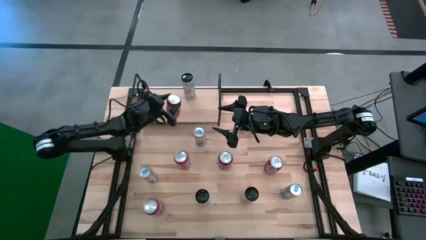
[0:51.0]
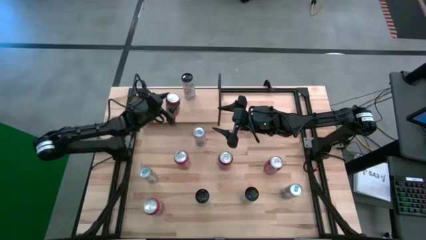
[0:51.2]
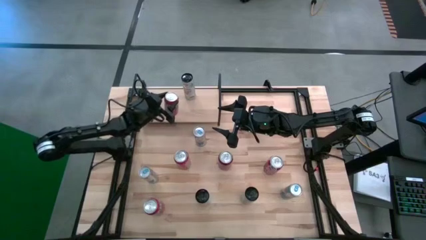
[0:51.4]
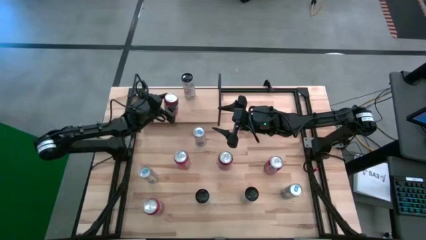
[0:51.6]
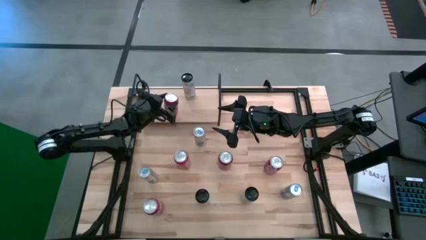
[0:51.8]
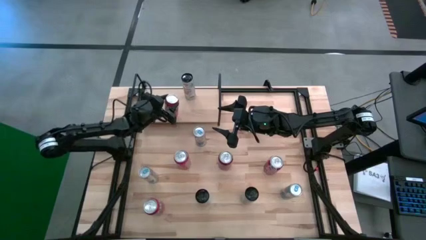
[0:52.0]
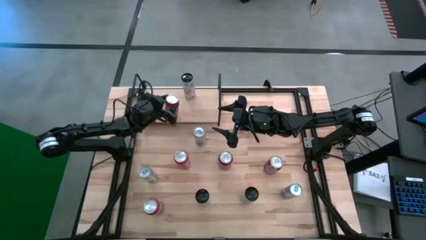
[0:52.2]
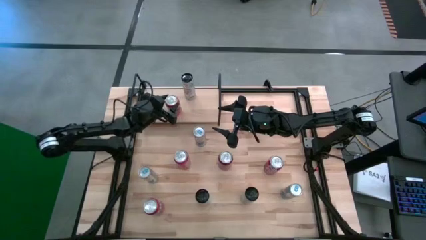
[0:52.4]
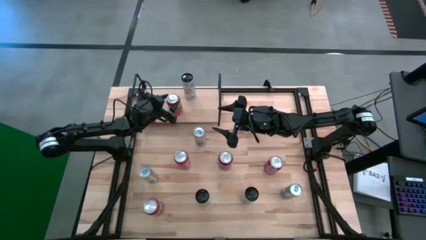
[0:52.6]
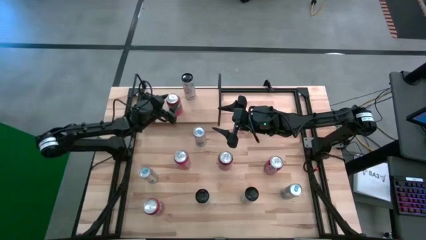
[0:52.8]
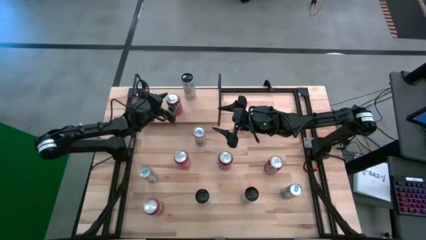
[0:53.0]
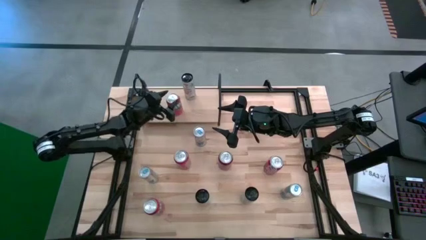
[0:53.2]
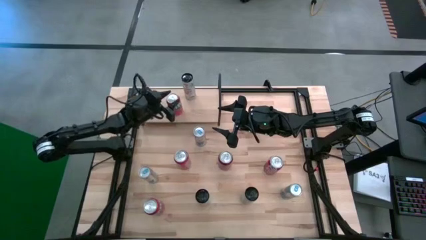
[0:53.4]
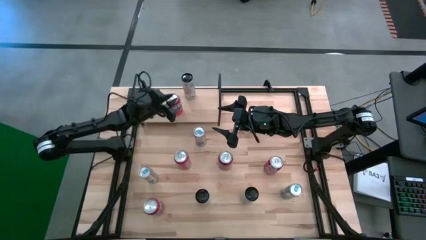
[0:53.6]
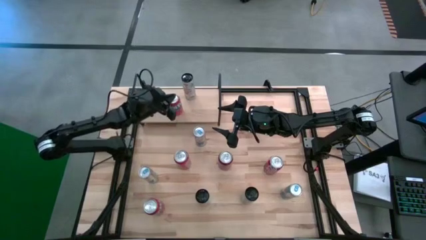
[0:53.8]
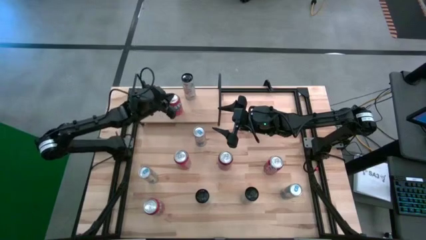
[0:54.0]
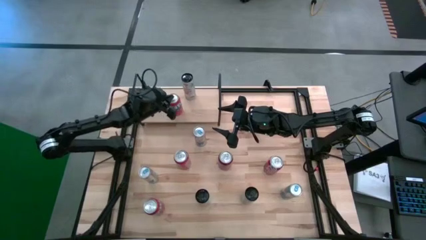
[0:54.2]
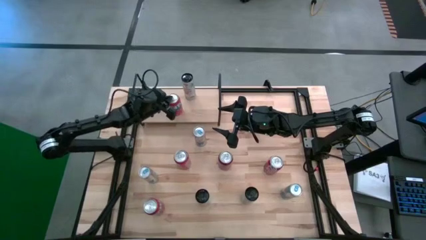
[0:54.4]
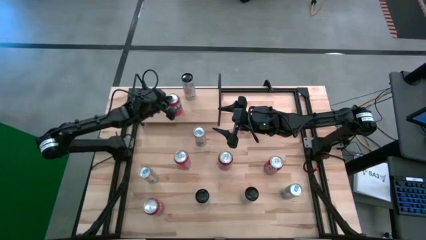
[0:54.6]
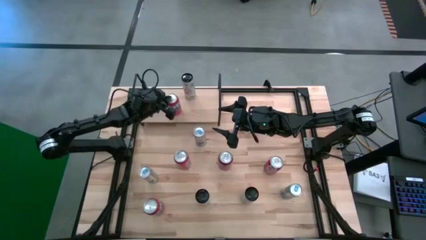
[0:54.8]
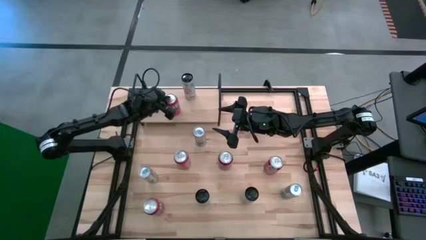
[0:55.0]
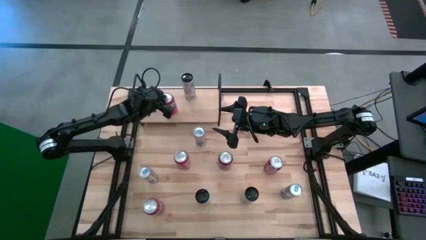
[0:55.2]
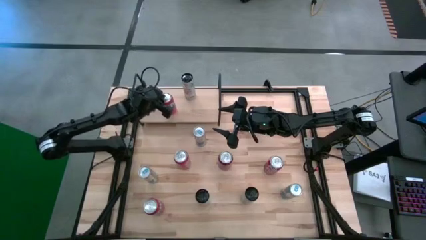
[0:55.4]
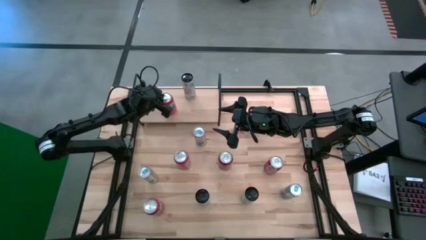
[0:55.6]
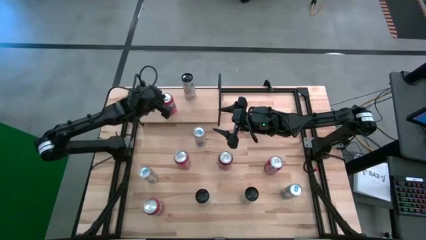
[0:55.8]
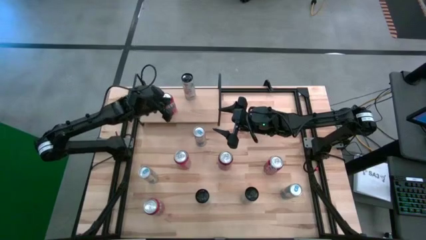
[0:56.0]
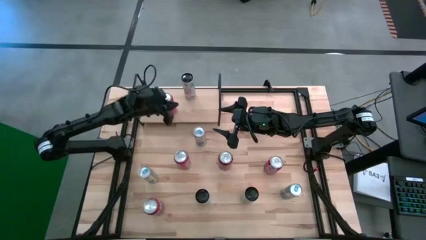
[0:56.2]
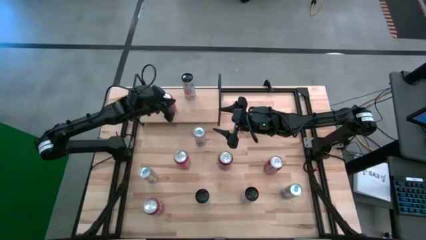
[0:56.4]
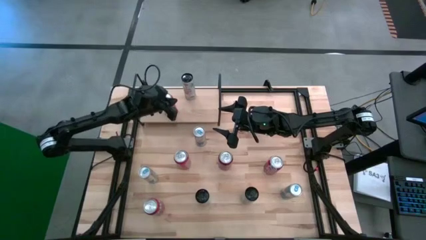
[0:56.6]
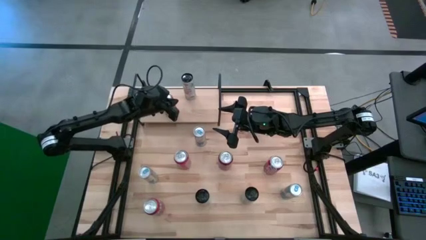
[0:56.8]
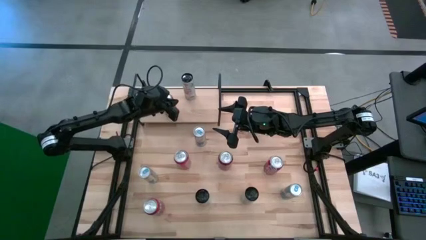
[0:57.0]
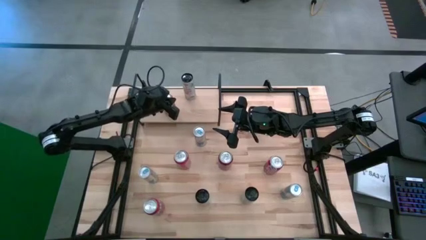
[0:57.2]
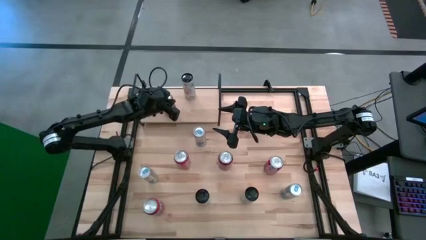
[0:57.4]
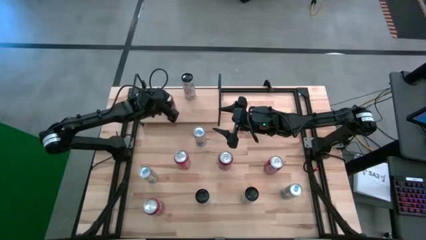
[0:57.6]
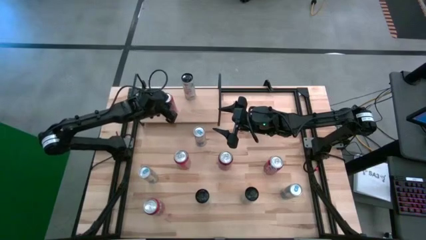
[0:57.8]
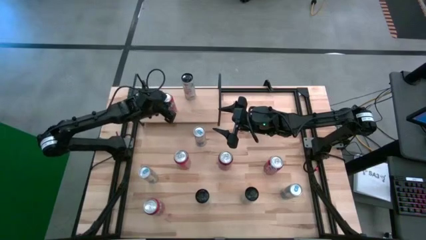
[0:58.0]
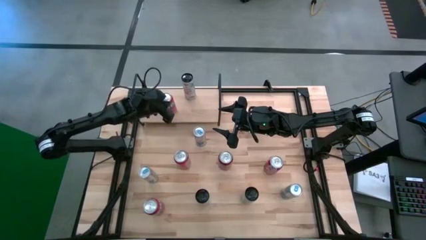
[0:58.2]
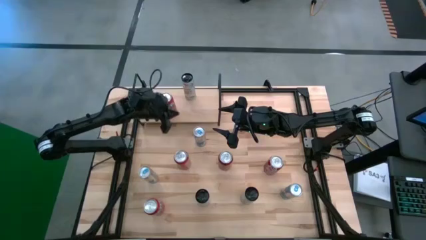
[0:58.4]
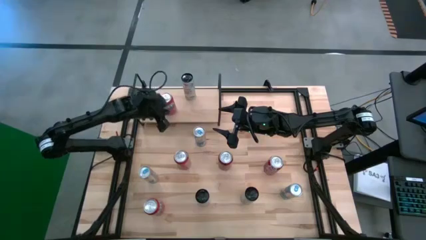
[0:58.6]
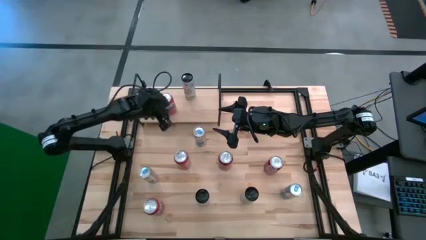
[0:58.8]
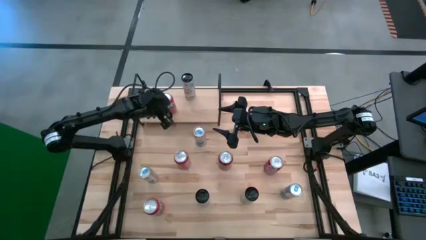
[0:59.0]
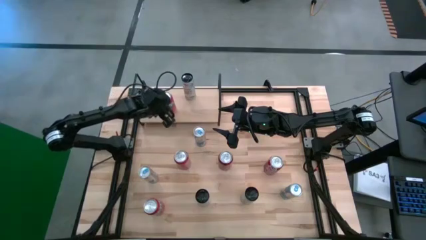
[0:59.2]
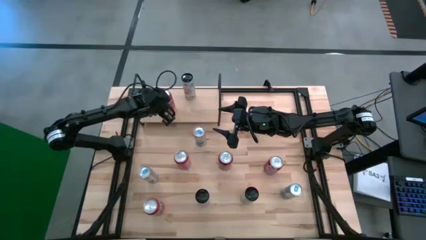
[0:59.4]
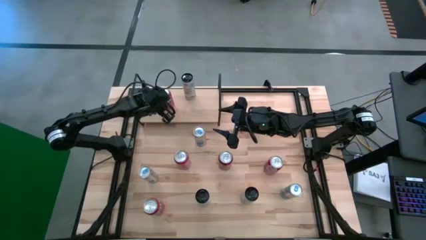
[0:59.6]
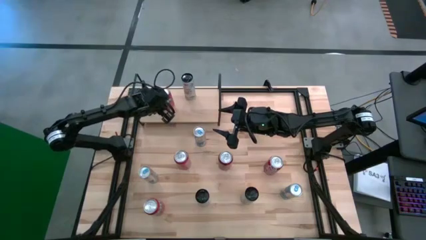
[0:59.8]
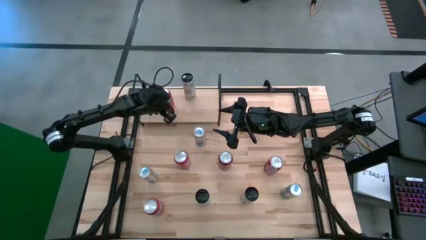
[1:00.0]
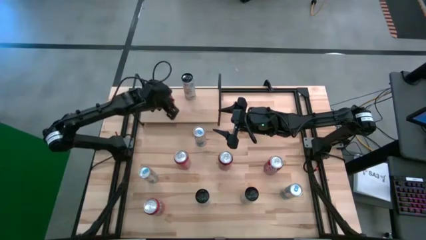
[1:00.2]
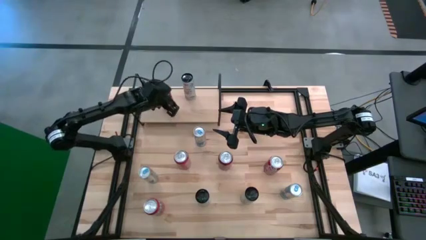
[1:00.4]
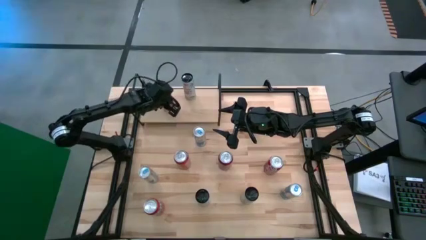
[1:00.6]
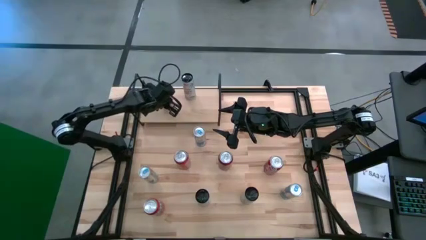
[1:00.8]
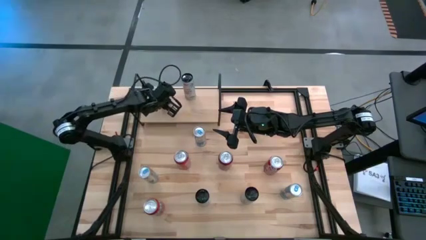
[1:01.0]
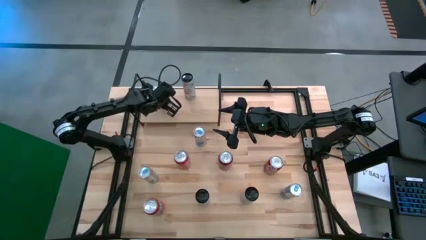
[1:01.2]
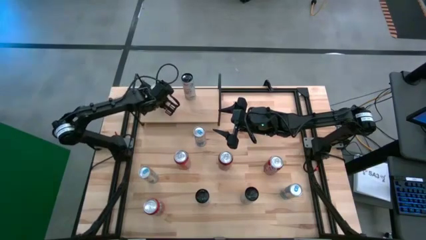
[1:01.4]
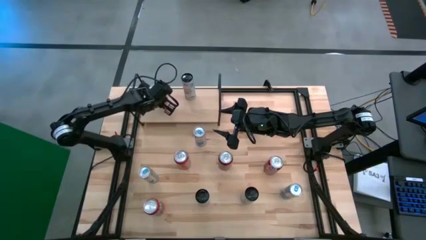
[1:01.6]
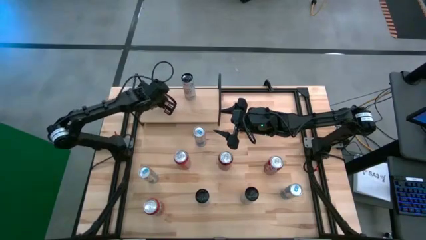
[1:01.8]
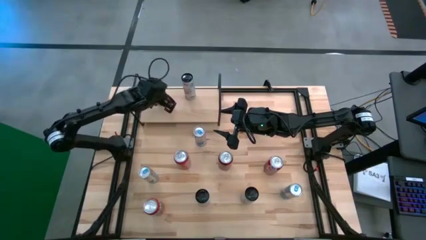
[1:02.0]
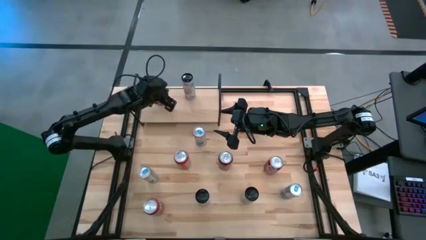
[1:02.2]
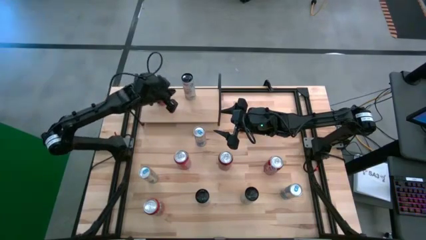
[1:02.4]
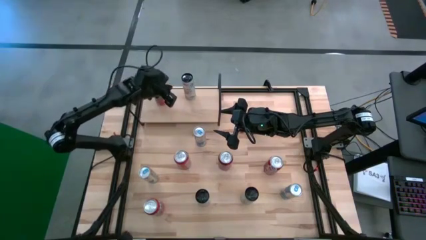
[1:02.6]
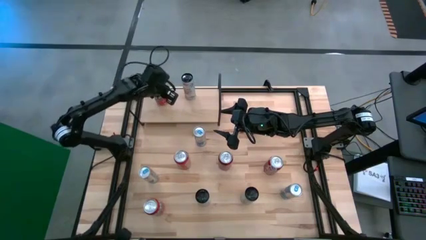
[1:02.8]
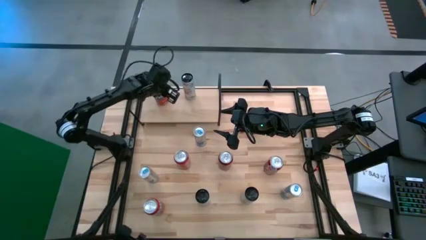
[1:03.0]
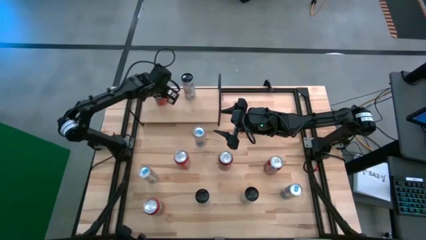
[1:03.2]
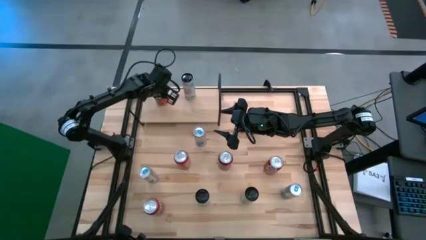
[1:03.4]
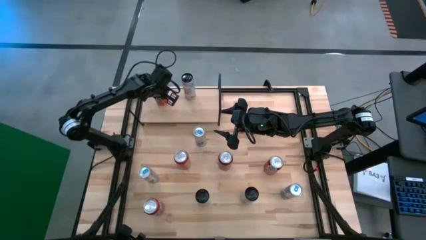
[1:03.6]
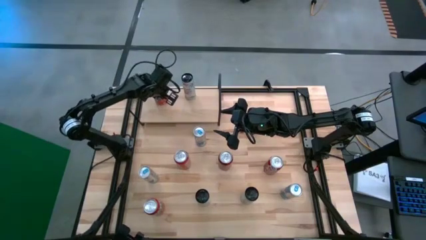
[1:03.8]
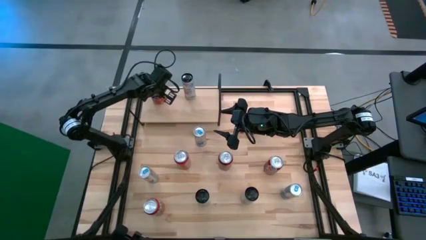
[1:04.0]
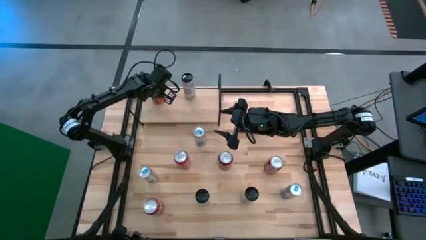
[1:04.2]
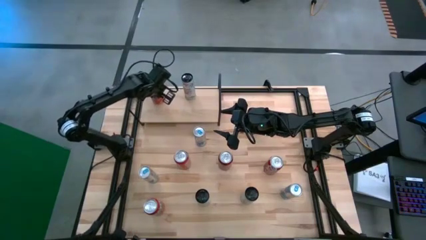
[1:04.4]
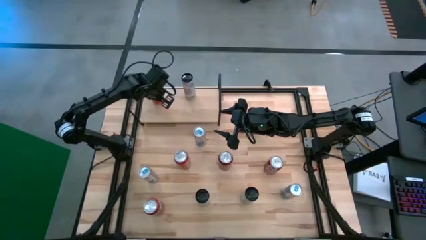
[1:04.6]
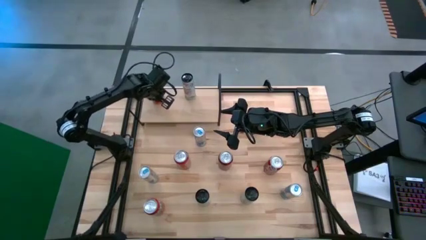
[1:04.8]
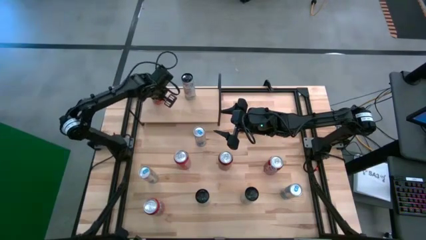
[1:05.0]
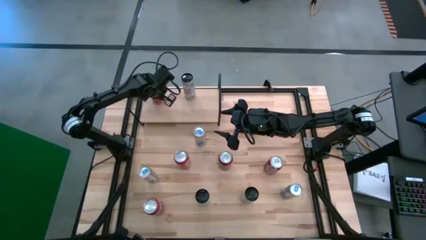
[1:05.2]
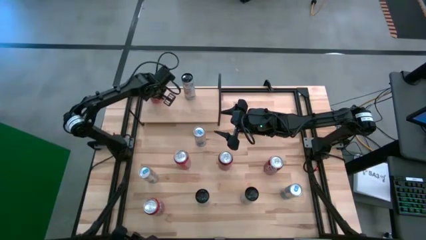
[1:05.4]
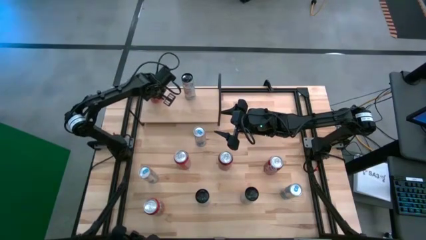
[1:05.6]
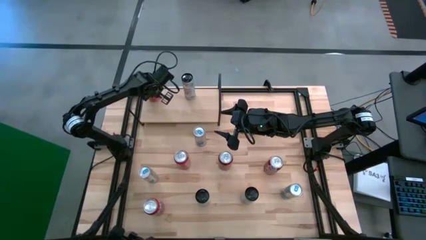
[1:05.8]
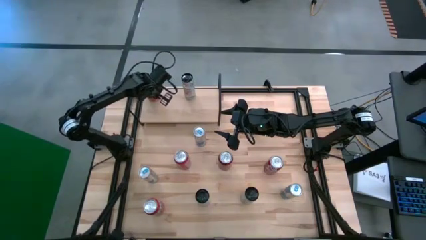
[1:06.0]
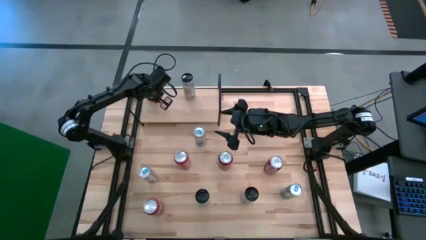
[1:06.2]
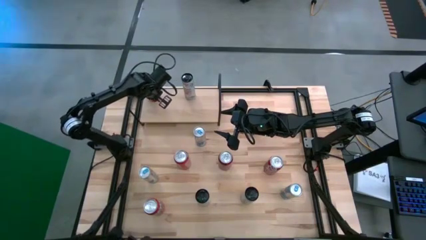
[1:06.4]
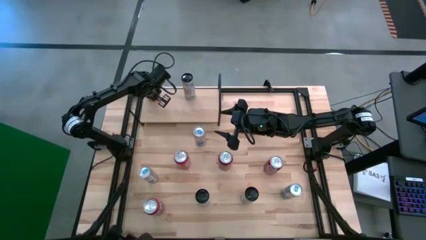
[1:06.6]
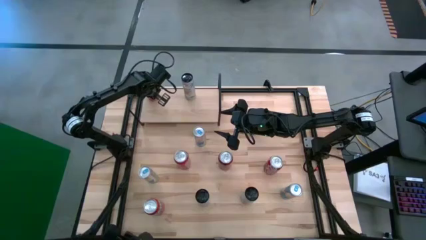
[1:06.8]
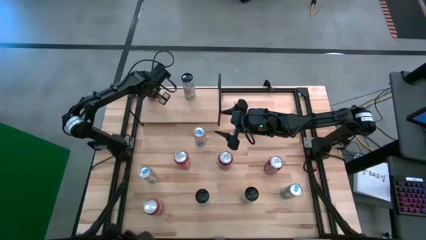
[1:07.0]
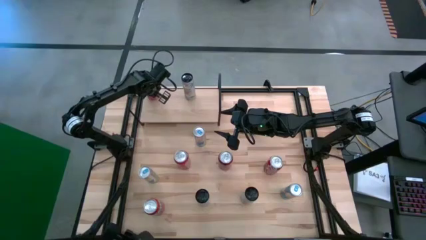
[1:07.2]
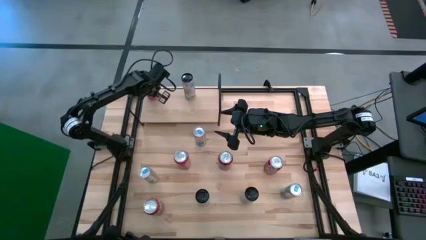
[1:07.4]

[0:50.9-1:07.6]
Task: Place canned beverage on shelf
Put the right orange soda can on the shelf
